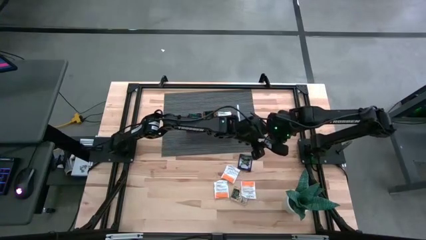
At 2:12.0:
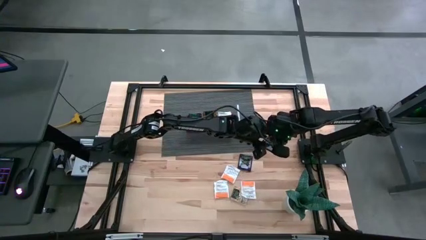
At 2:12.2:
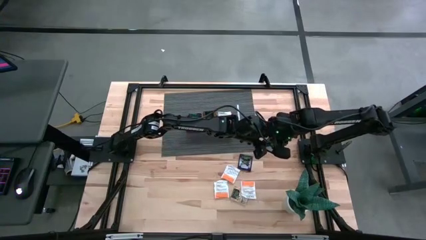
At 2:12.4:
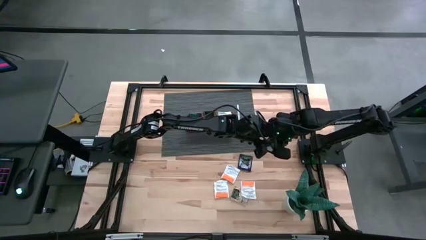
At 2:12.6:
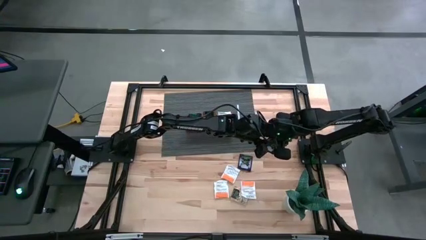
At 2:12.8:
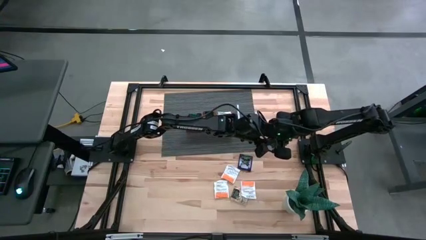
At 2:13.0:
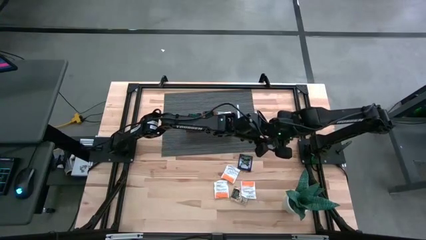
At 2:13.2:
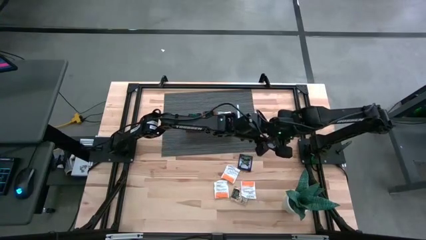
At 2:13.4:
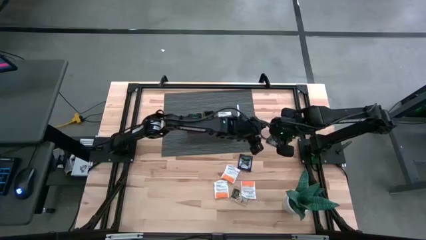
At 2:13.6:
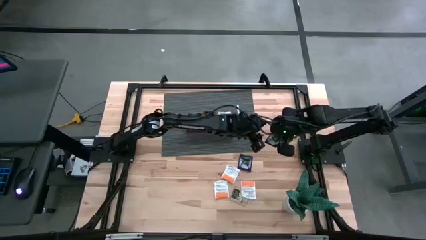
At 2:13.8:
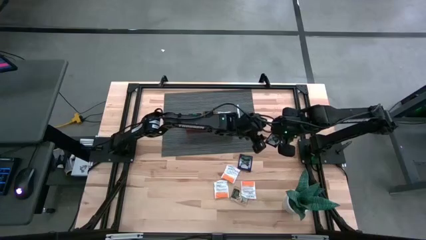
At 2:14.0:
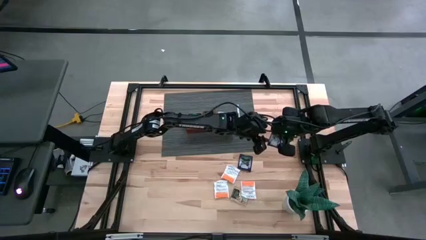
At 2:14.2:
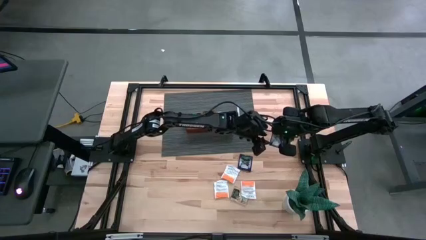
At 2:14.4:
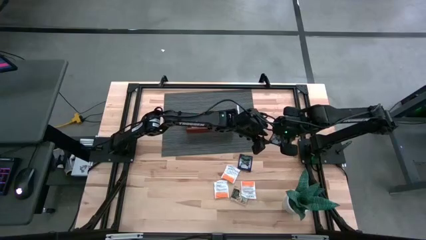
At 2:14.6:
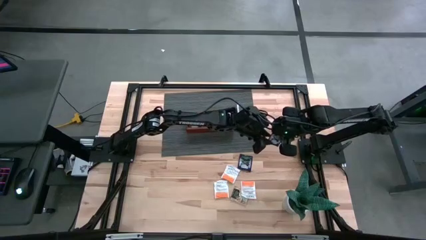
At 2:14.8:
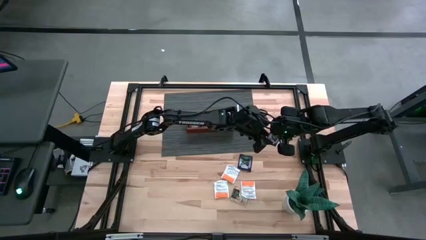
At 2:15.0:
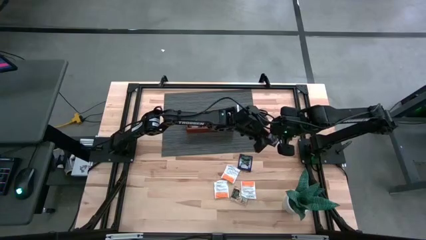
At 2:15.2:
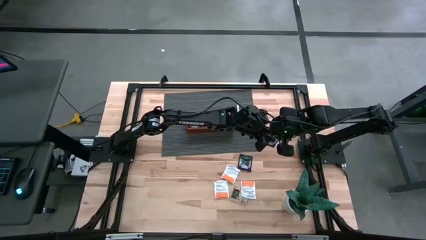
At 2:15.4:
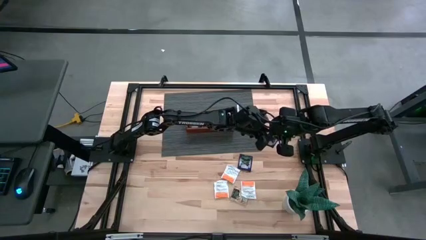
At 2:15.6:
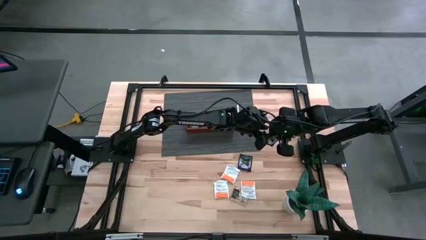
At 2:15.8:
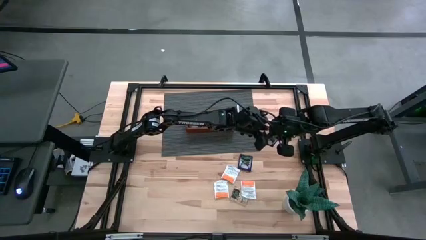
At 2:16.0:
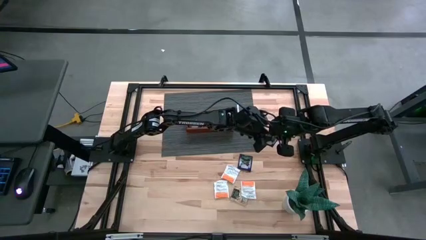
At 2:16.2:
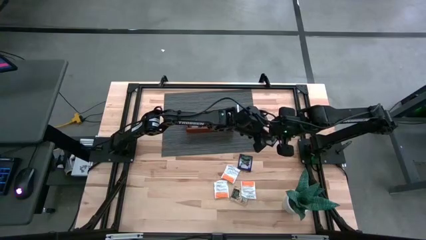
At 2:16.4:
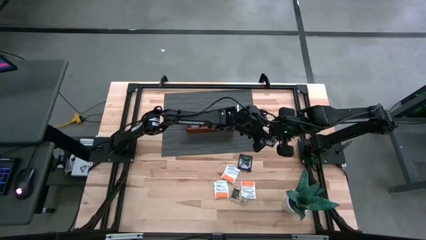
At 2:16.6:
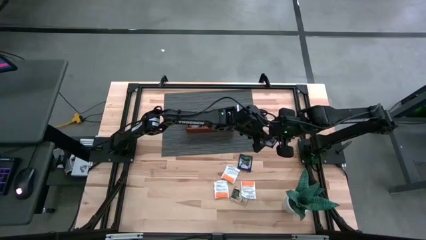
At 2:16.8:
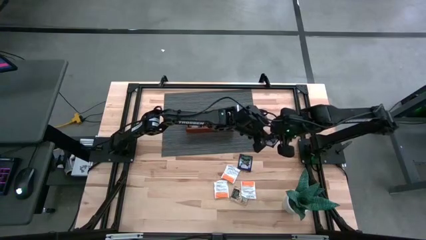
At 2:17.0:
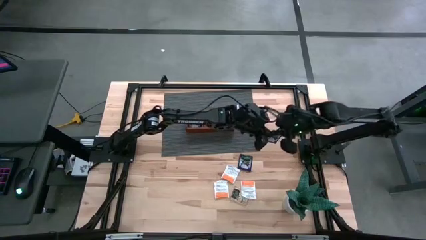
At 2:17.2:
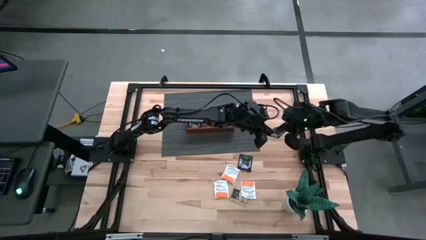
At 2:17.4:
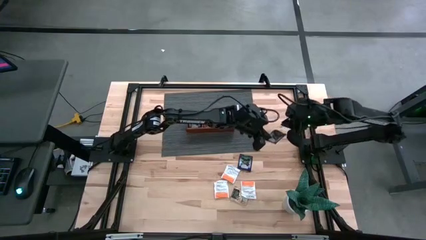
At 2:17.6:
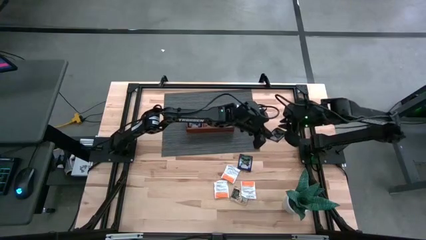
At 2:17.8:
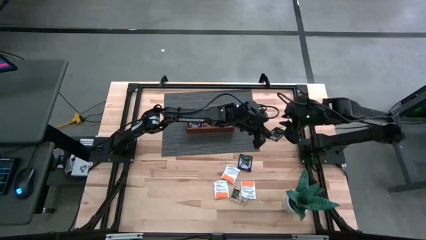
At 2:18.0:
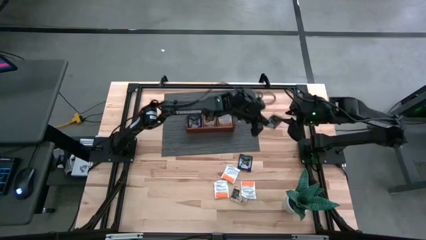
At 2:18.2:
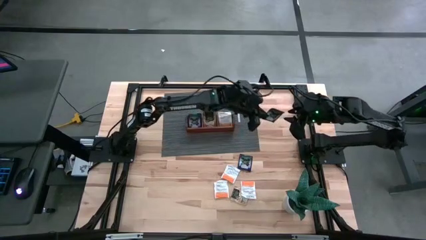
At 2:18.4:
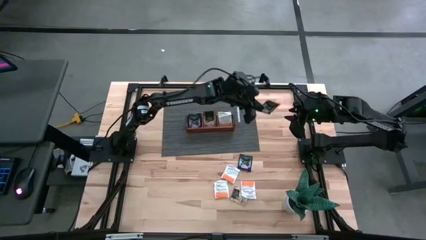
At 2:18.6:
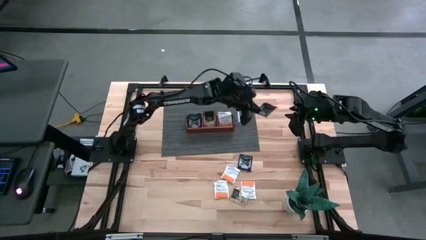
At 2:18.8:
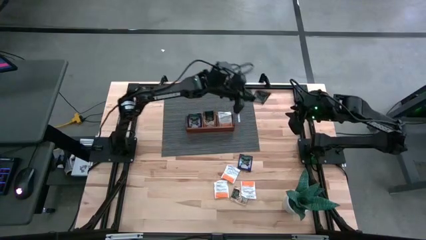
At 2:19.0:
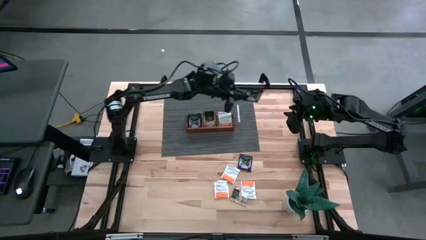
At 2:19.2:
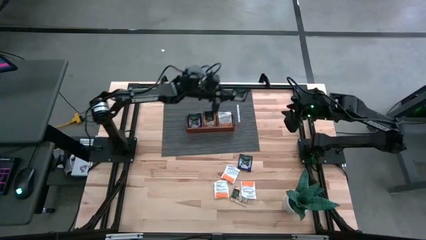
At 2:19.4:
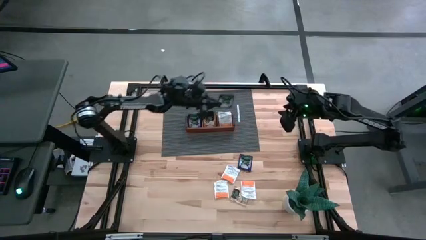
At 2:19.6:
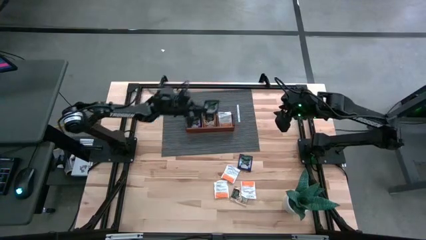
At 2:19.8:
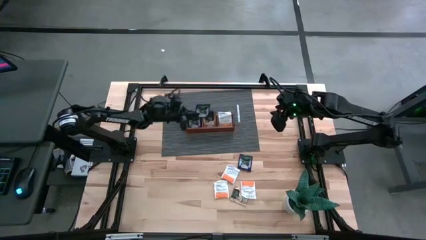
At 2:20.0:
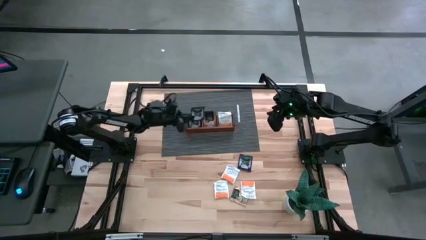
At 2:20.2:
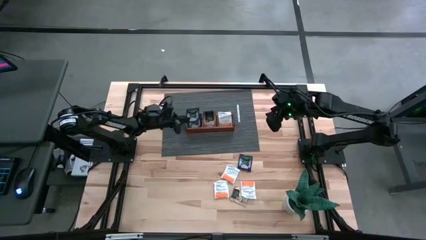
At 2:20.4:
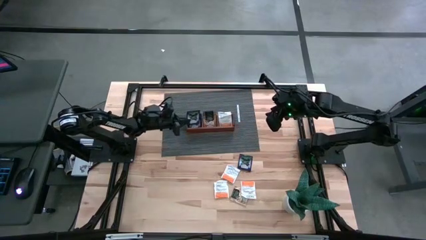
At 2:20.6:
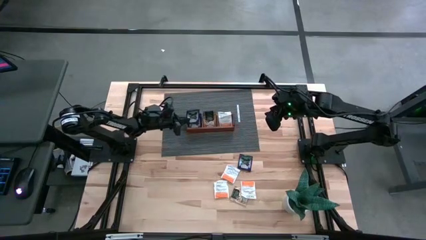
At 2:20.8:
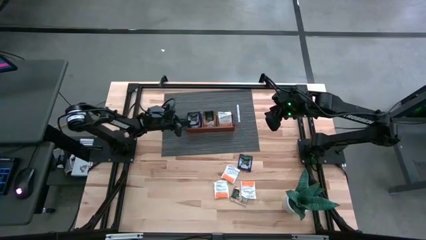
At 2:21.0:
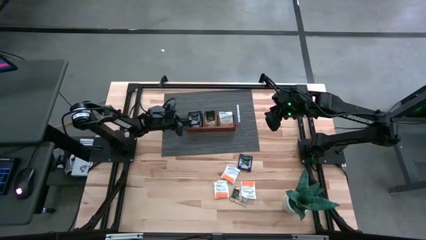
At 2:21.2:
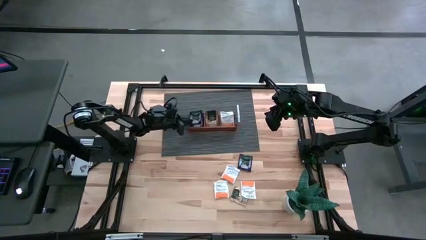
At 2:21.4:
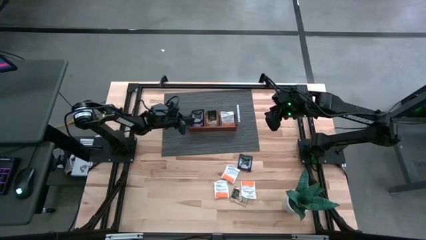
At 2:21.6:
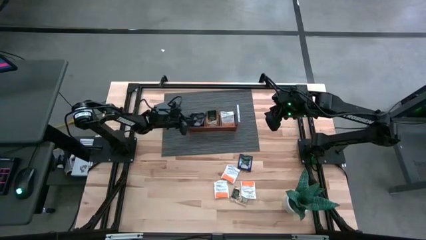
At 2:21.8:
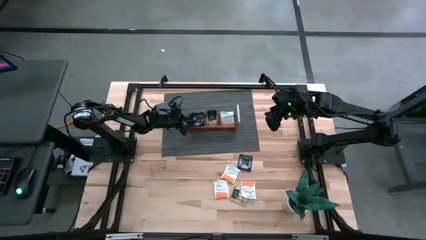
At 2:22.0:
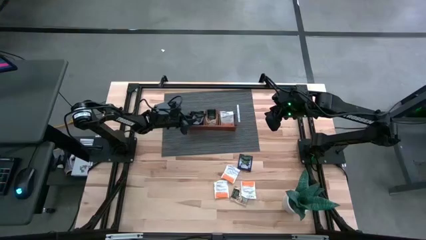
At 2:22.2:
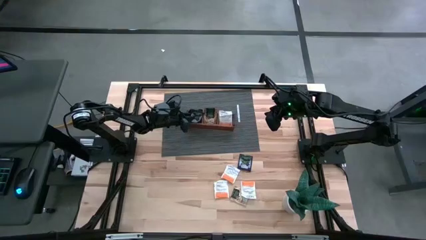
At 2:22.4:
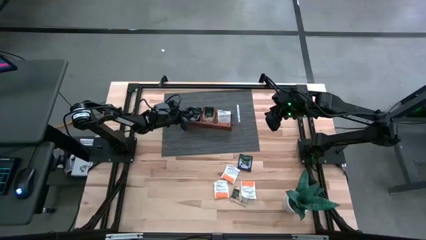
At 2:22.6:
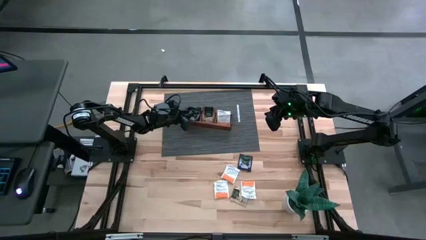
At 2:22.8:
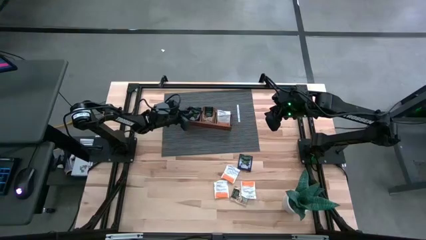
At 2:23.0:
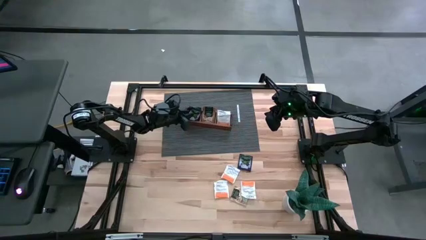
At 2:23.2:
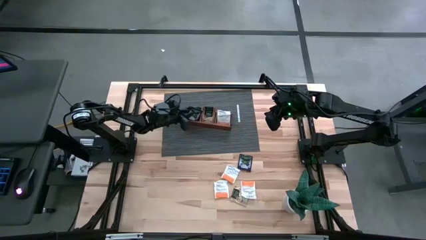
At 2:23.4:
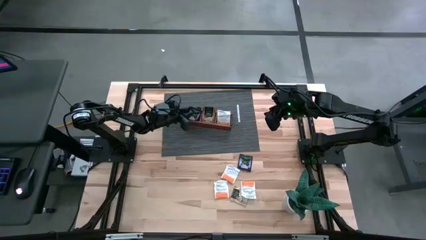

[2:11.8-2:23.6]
Task: Pick & Place Tea
Put the violet tea bag into the left section of the wooden organizer

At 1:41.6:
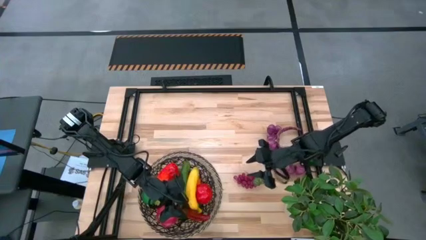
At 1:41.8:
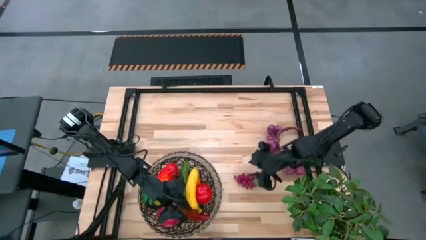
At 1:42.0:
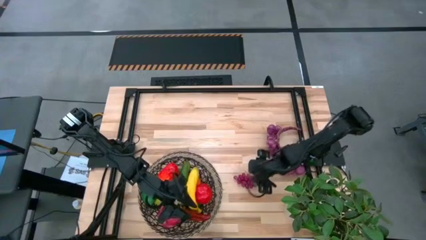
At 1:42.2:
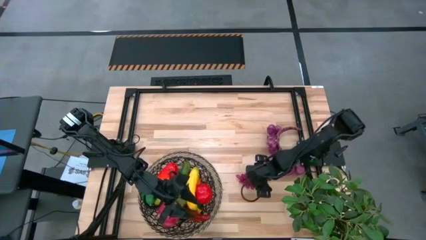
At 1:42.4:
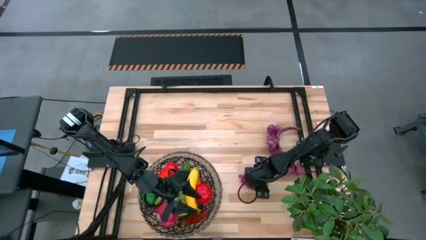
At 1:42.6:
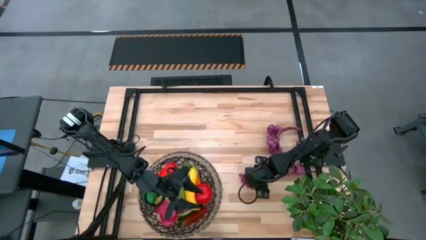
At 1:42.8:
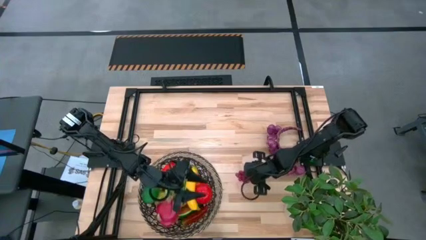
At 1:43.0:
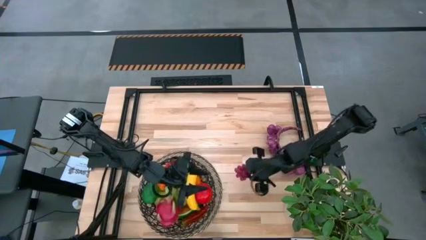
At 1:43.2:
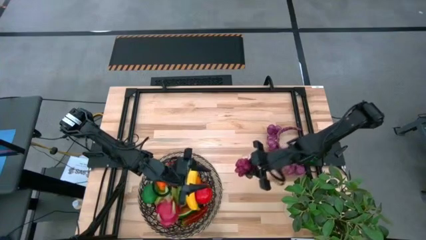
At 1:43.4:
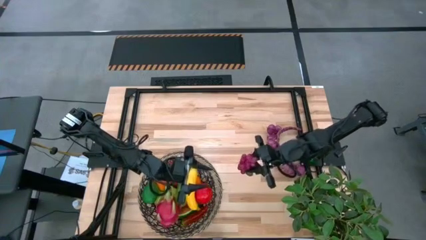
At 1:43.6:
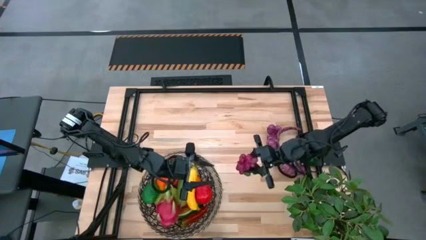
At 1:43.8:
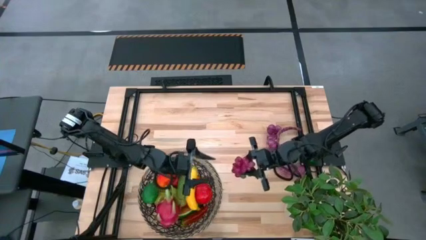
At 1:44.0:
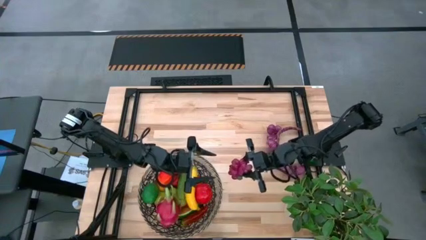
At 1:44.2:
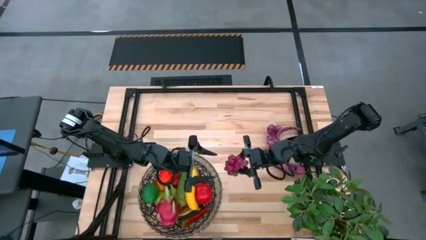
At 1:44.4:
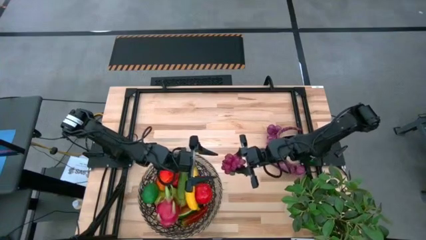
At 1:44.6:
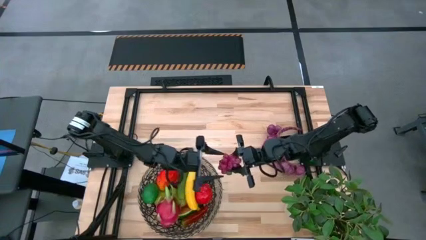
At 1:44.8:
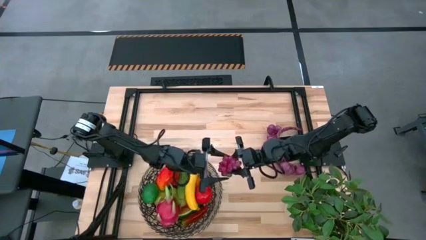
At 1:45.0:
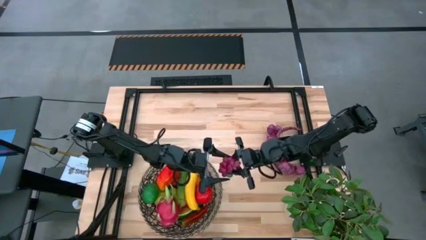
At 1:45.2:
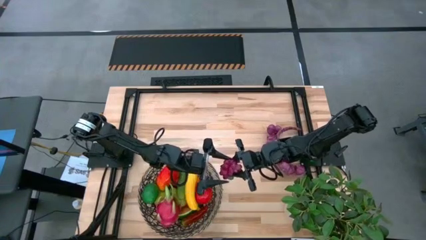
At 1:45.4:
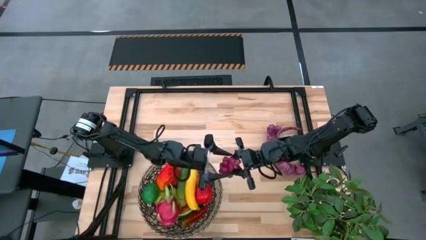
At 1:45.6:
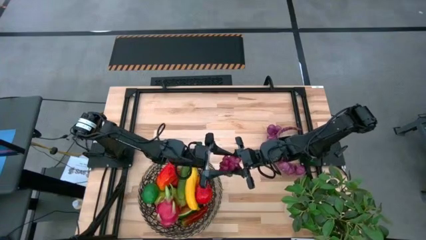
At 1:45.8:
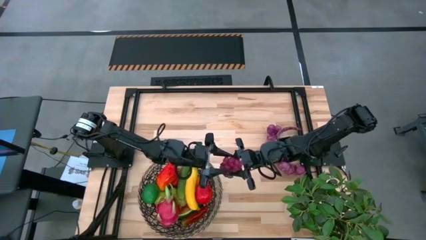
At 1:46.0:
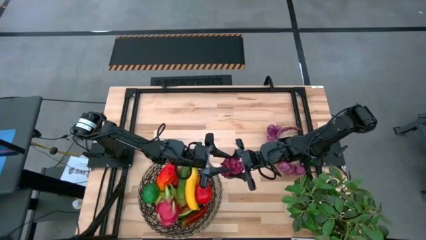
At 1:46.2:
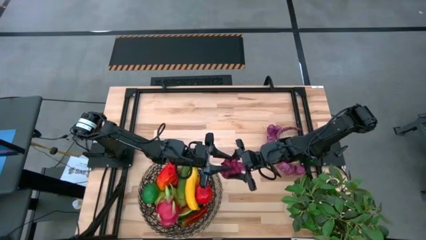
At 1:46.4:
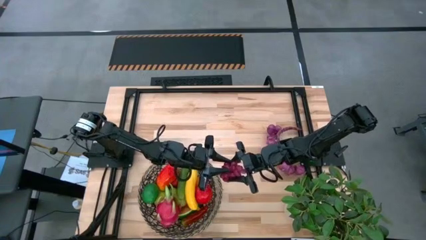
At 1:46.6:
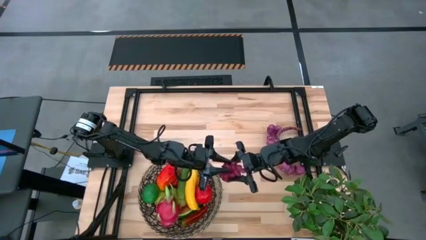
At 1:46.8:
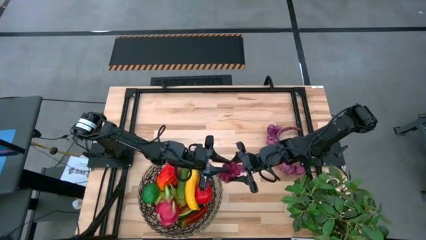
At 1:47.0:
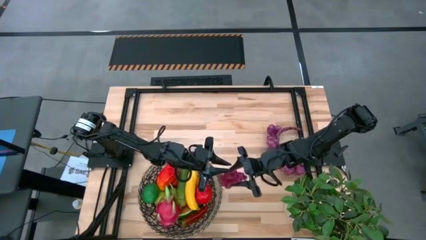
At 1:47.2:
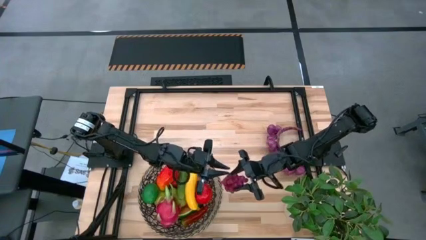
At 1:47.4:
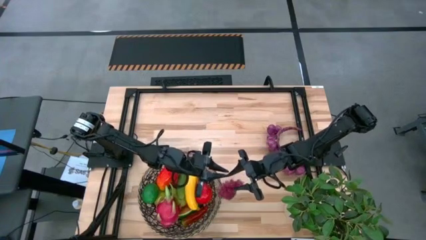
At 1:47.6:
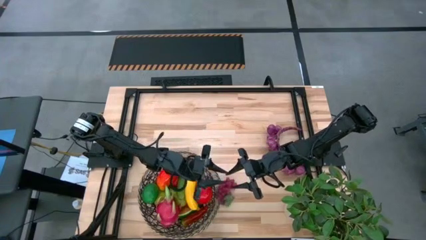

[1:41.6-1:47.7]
Task: Build produce basket
Put the grapes into the woven basket
